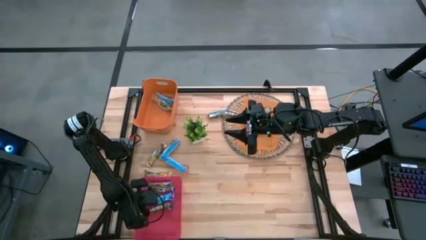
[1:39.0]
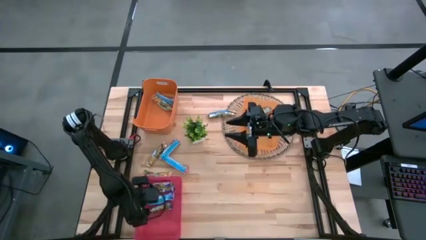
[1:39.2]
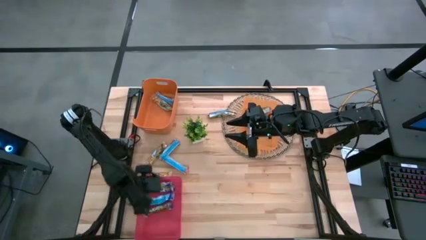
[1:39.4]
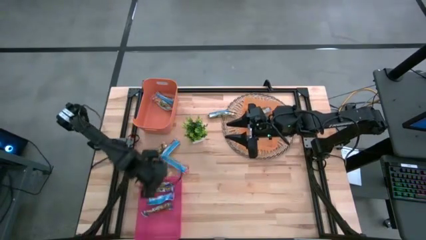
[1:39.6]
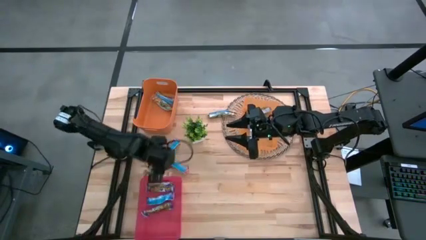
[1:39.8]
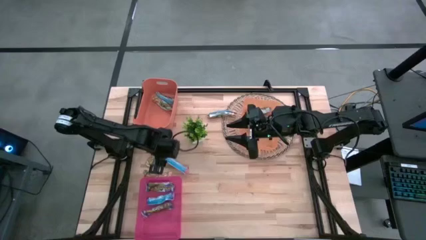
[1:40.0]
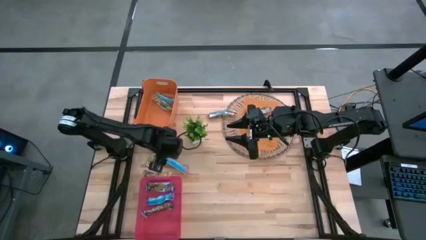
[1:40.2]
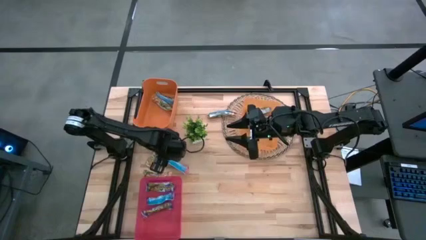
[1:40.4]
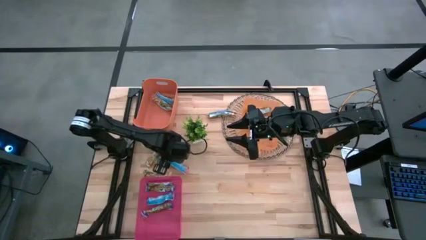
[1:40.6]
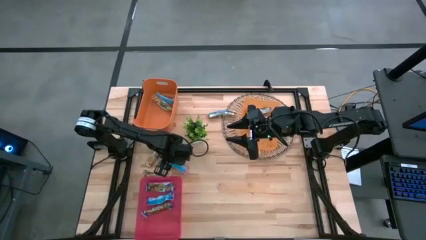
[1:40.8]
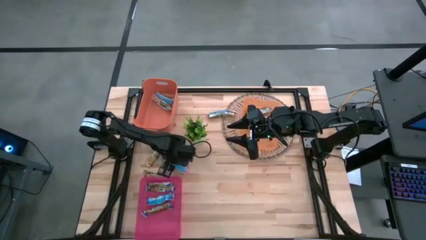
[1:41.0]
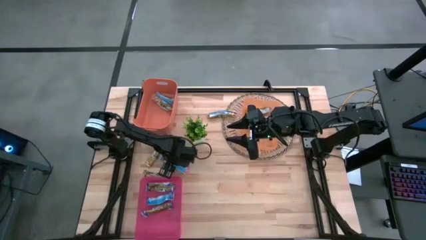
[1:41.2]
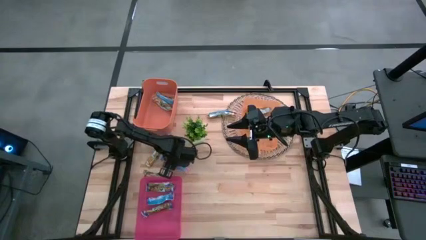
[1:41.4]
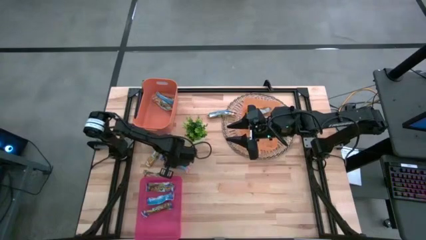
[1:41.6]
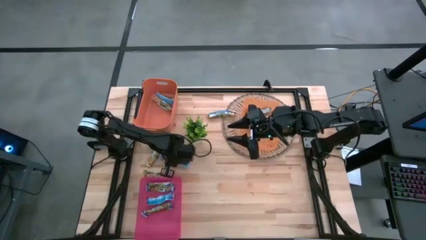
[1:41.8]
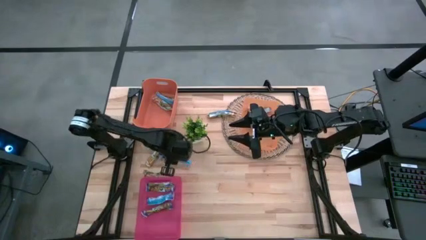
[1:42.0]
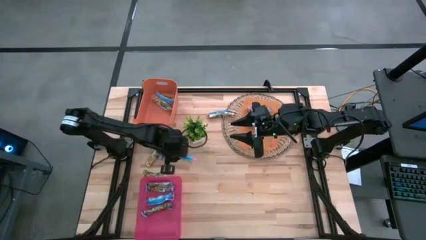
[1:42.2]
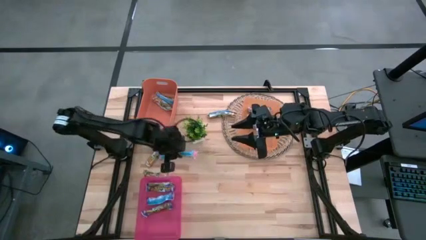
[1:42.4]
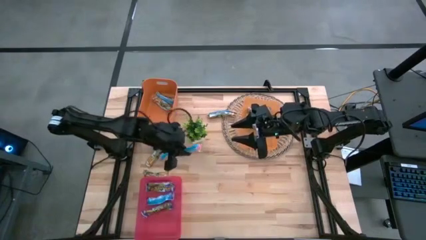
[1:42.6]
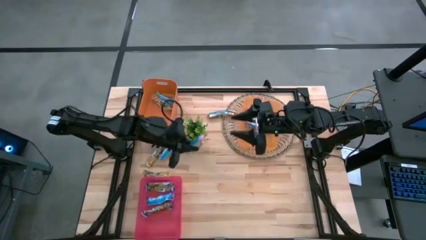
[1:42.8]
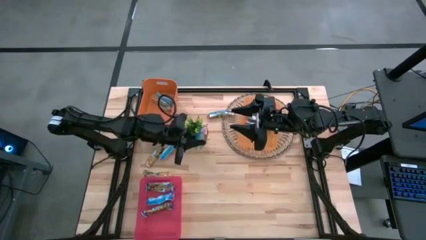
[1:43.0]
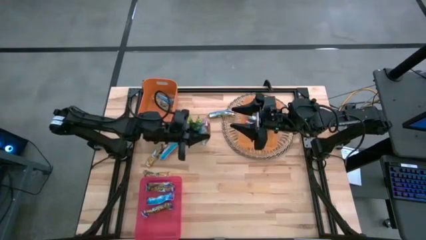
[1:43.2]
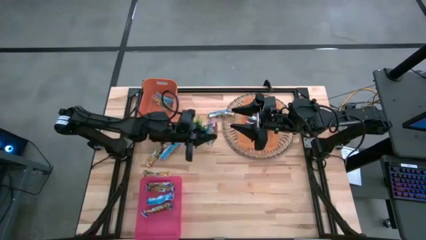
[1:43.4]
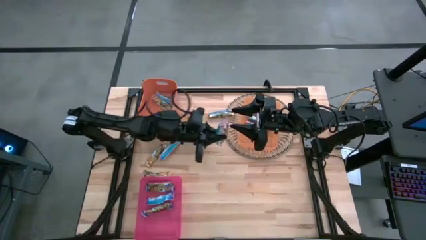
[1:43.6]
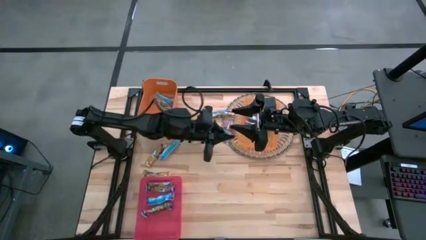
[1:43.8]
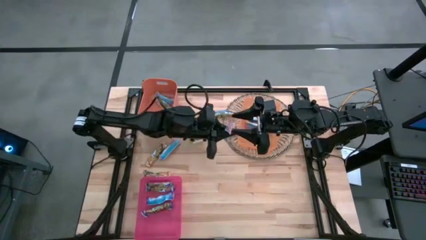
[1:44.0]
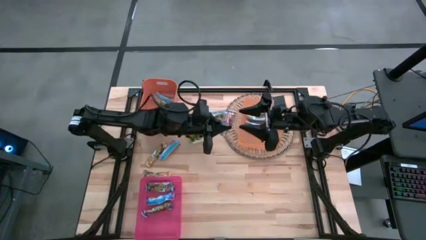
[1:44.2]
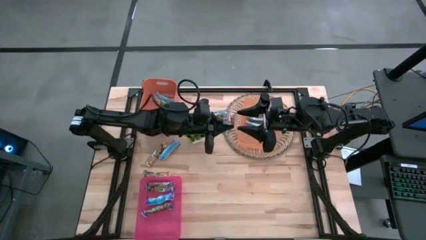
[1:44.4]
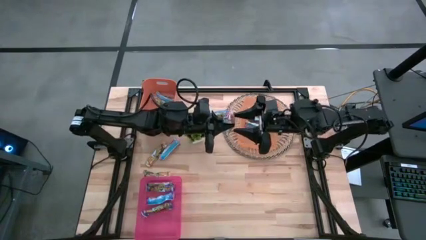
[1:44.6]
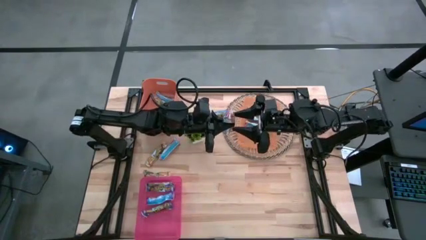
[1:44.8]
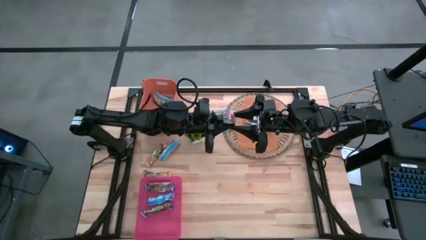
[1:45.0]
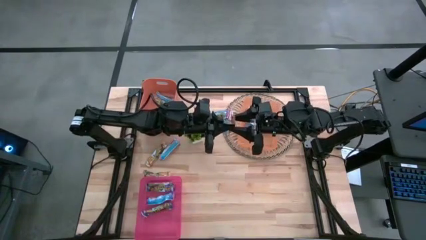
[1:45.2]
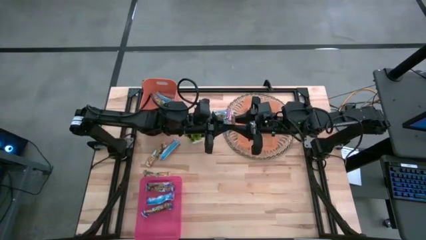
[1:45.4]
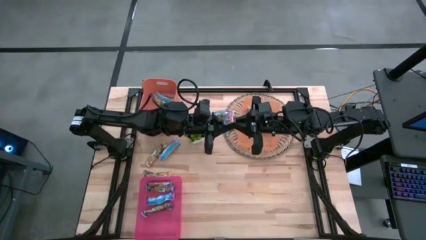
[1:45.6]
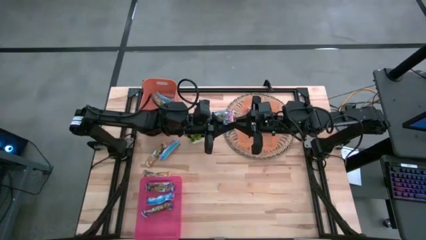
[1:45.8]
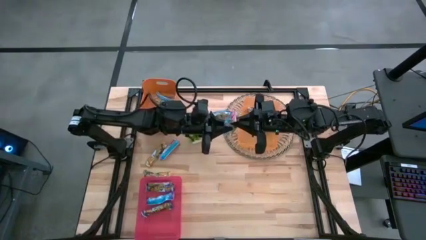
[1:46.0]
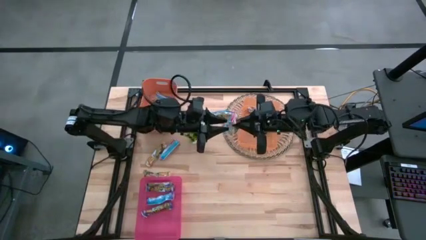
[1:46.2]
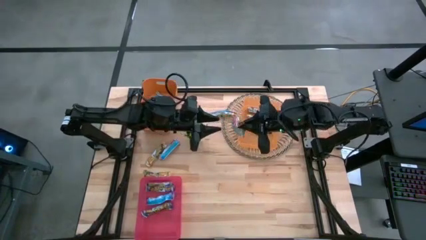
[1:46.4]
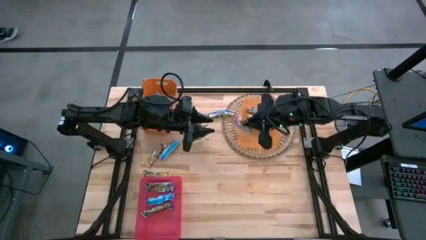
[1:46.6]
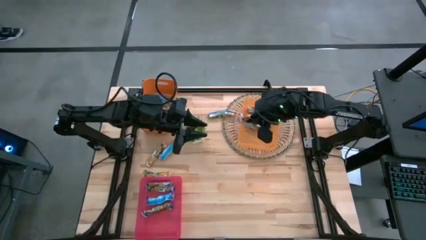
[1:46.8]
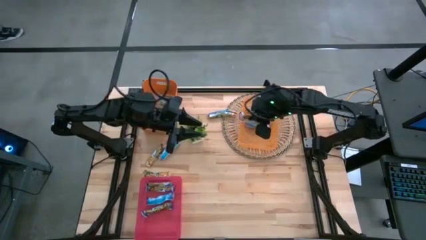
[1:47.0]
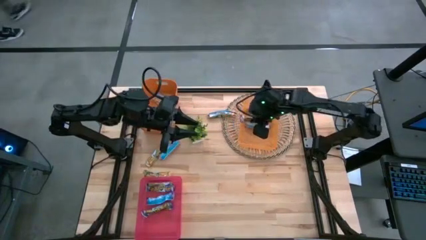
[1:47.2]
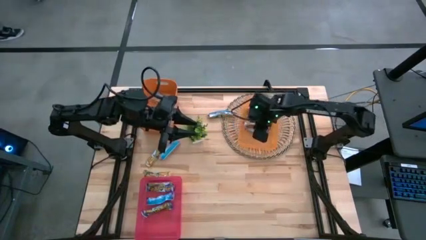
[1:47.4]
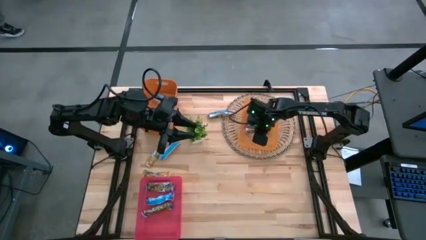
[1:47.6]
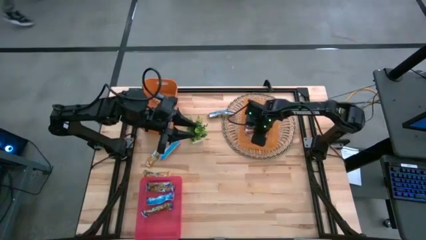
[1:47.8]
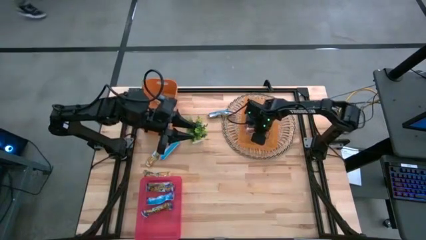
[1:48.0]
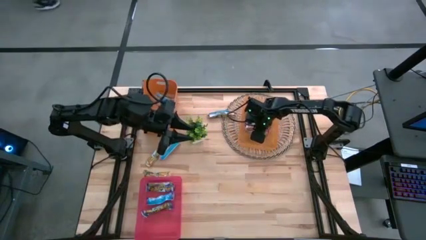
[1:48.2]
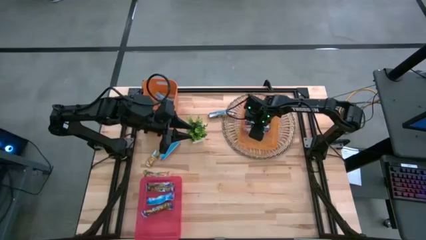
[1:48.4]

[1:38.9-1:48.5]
Task: Pick and place Granola Bars by type
Put the bottom red granola bar into the right orange bin
